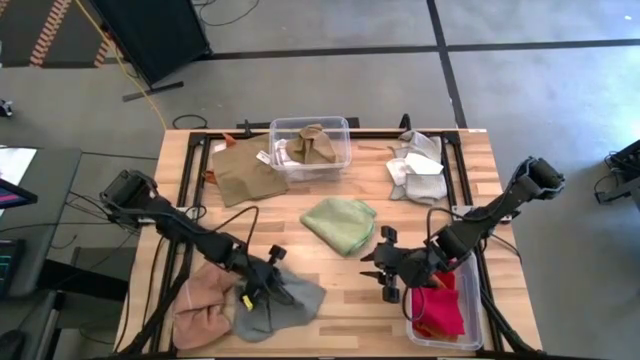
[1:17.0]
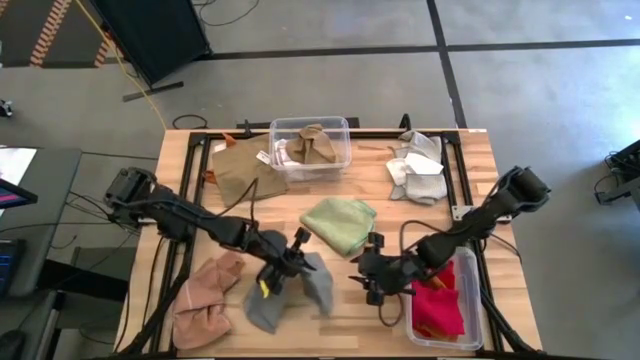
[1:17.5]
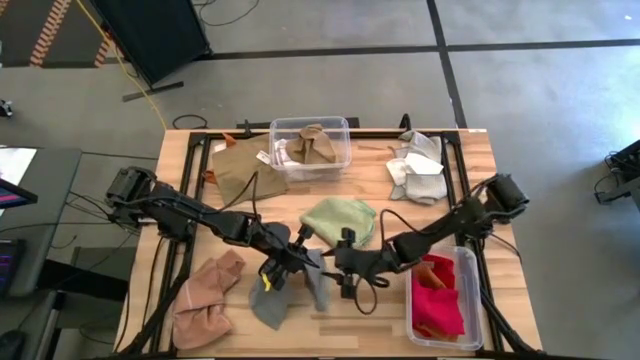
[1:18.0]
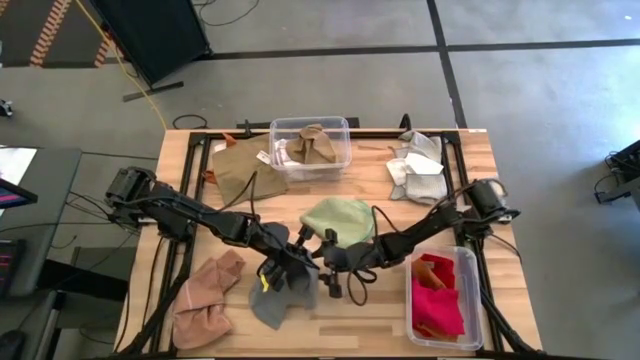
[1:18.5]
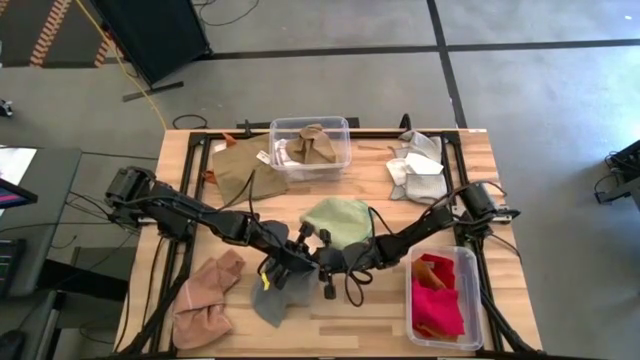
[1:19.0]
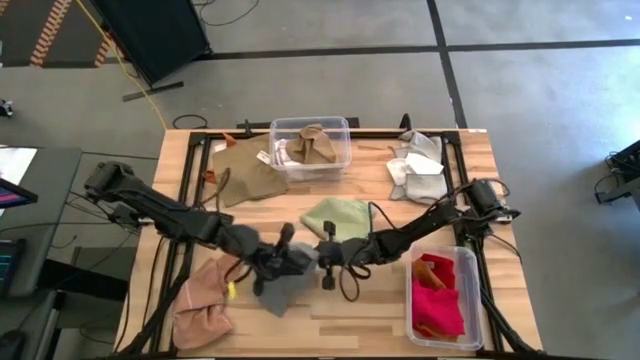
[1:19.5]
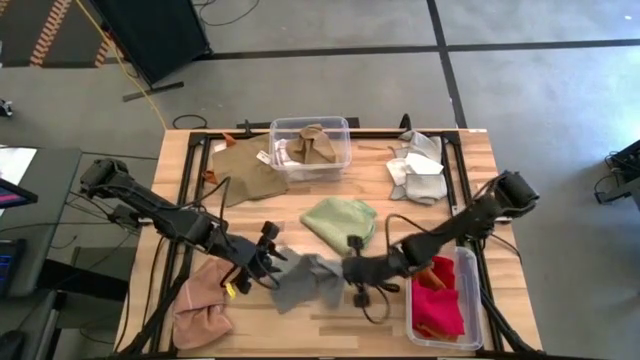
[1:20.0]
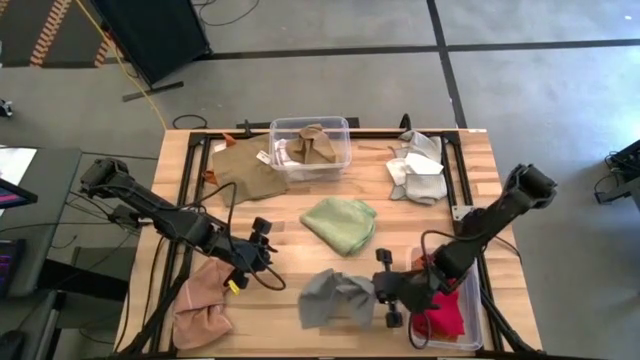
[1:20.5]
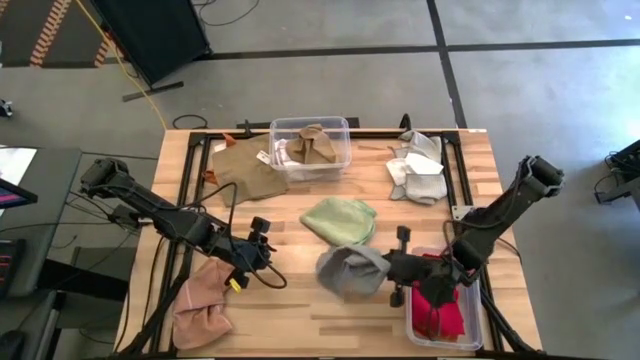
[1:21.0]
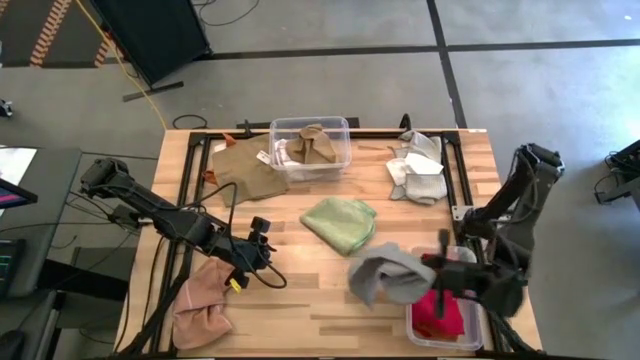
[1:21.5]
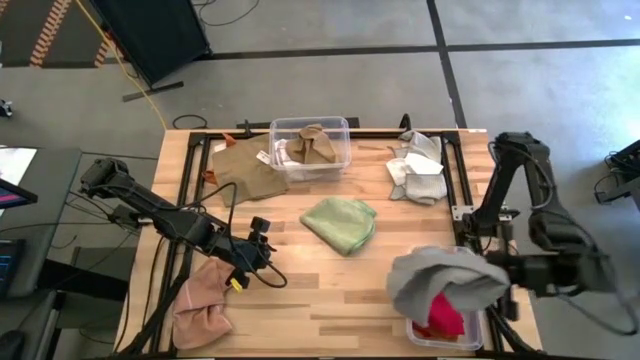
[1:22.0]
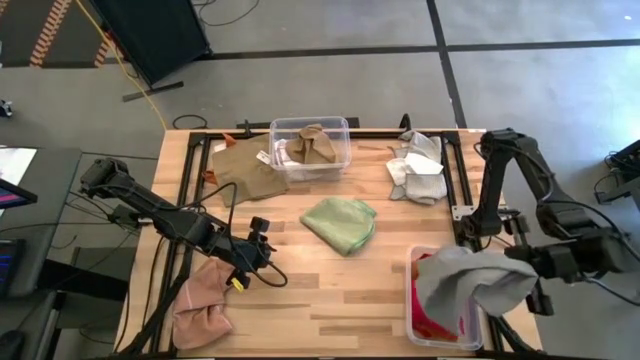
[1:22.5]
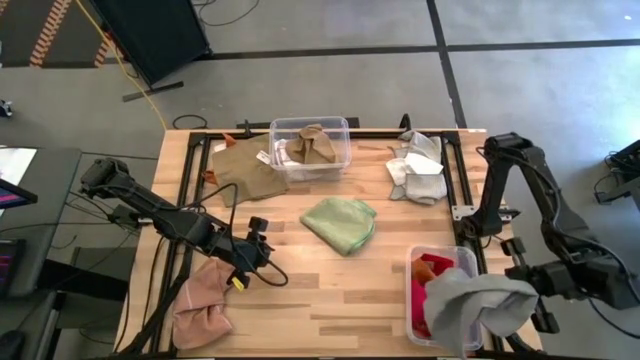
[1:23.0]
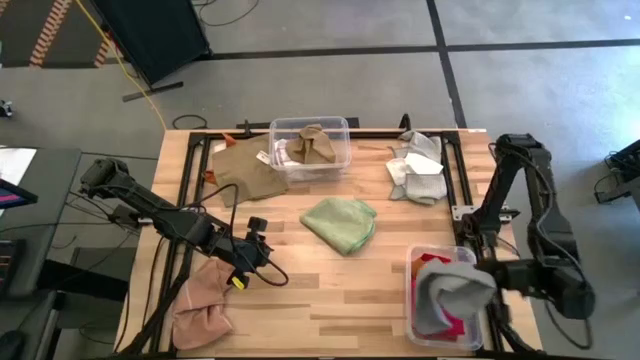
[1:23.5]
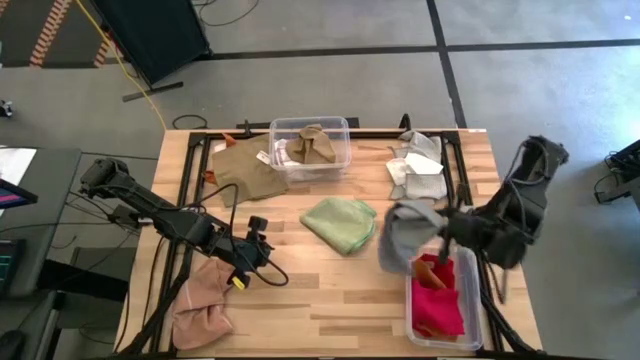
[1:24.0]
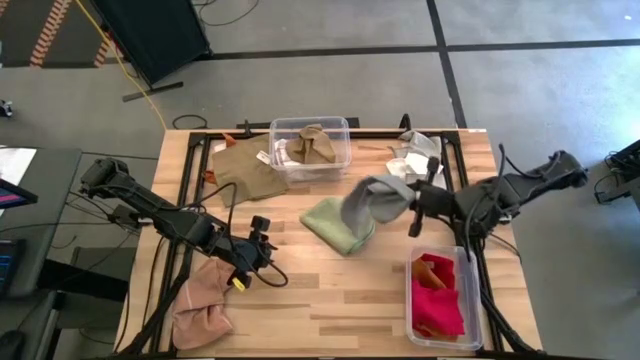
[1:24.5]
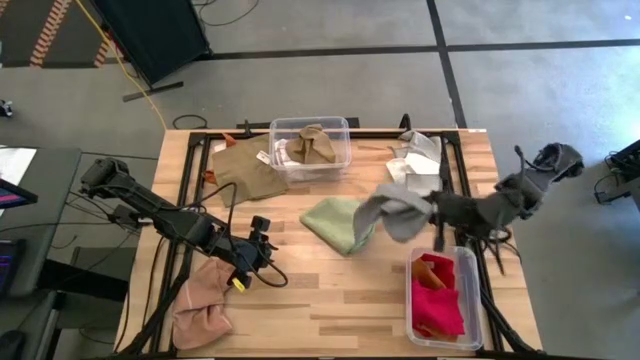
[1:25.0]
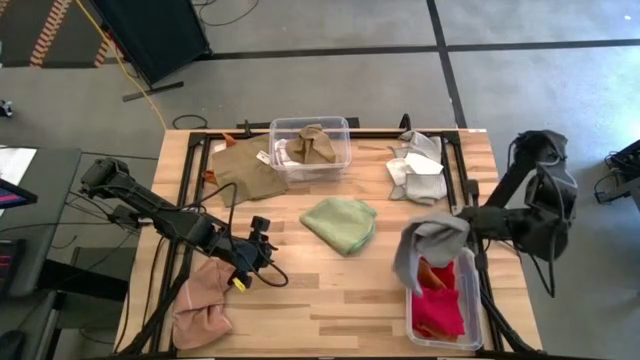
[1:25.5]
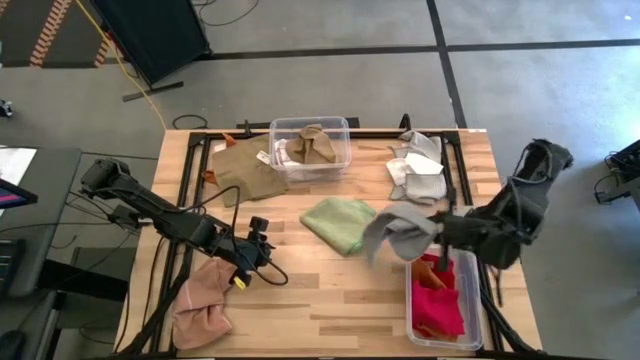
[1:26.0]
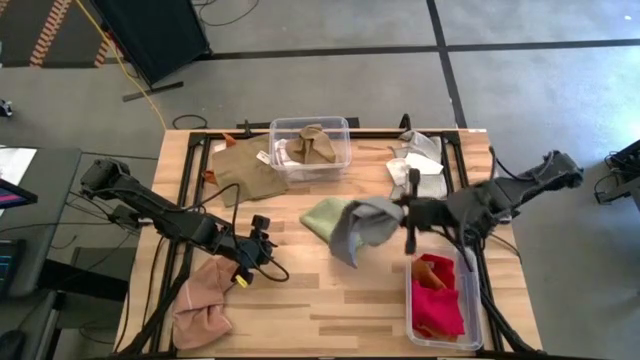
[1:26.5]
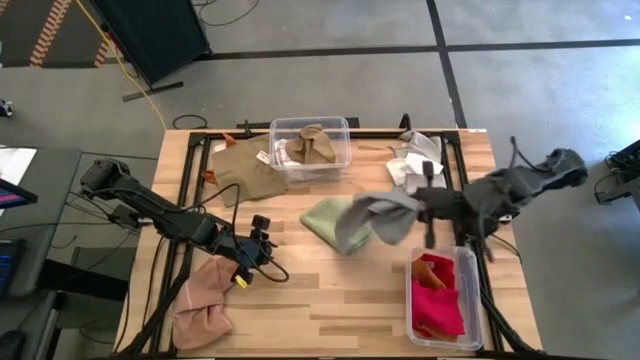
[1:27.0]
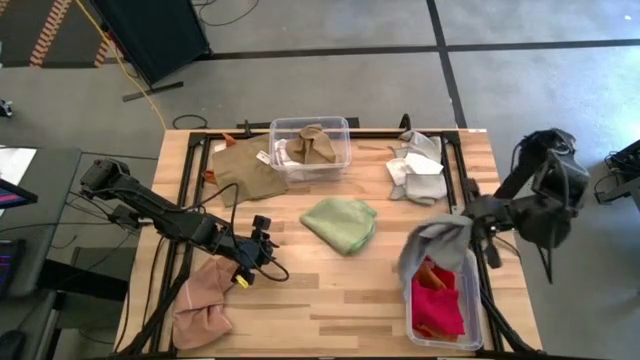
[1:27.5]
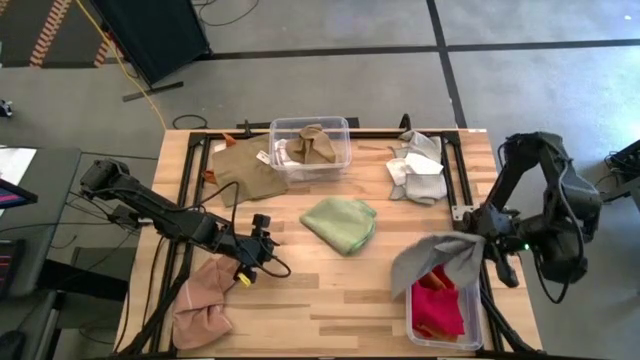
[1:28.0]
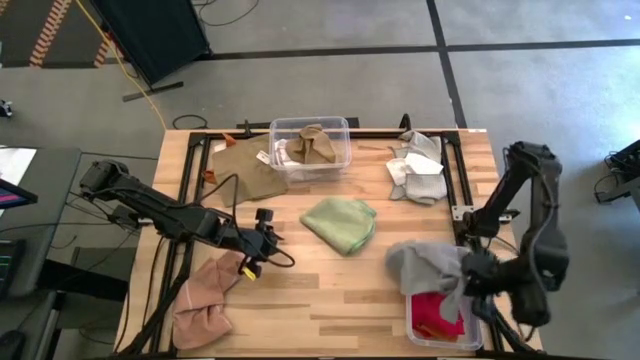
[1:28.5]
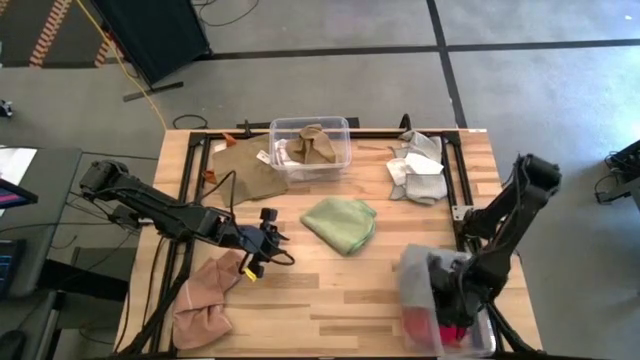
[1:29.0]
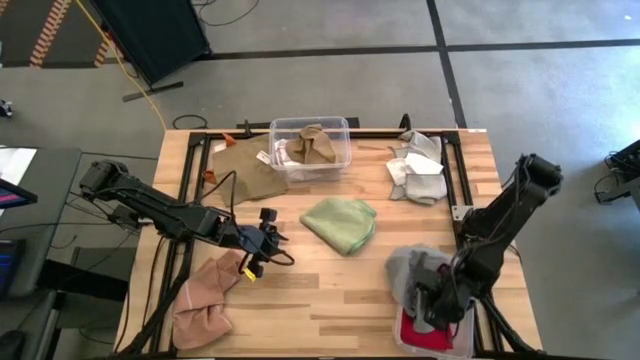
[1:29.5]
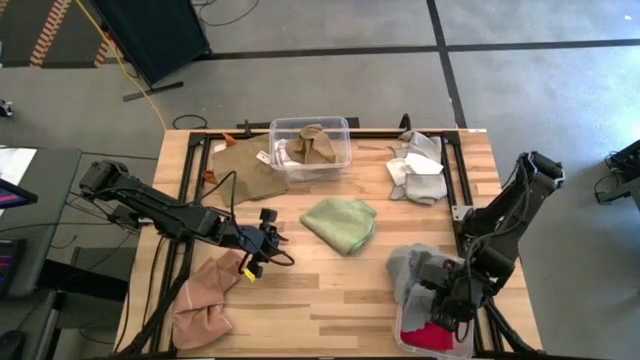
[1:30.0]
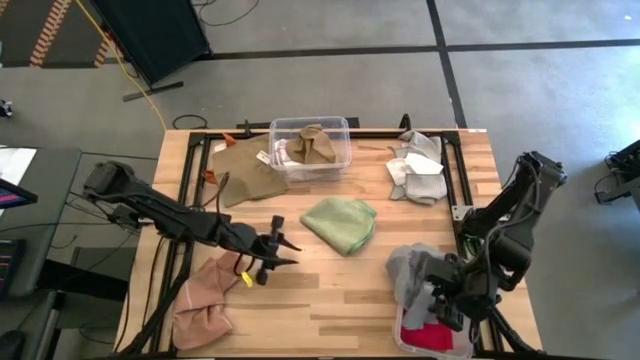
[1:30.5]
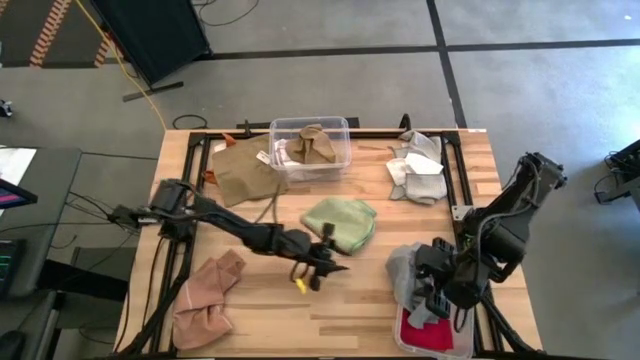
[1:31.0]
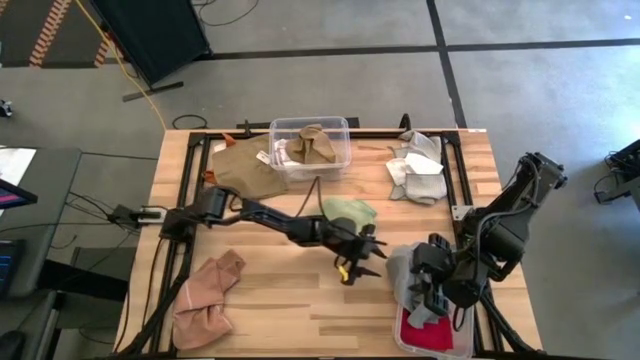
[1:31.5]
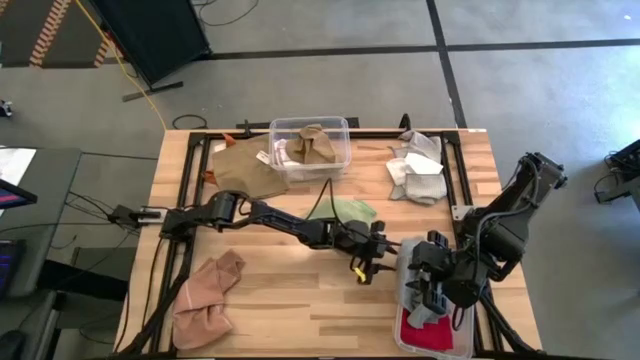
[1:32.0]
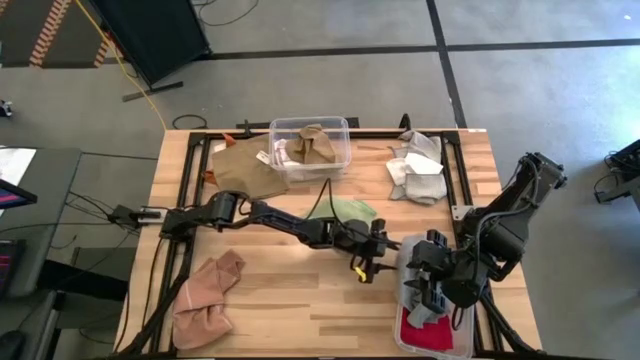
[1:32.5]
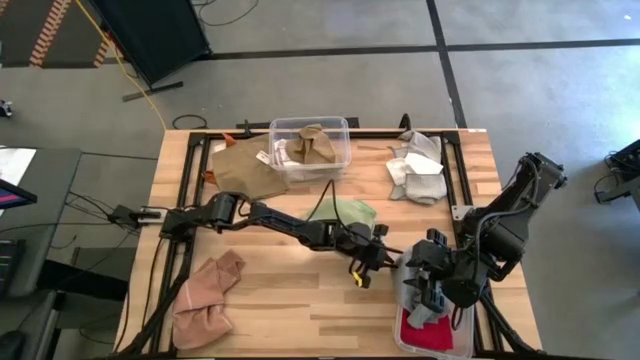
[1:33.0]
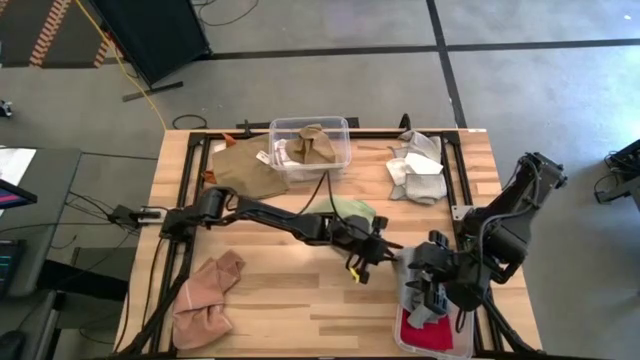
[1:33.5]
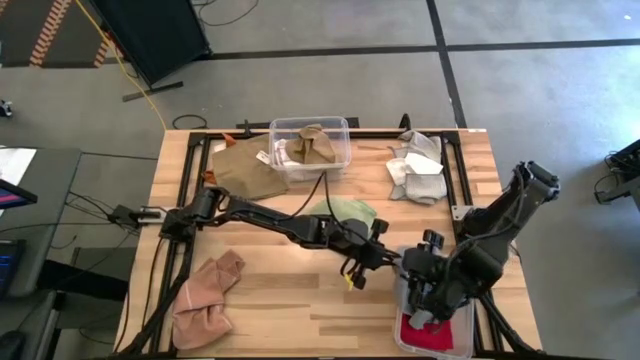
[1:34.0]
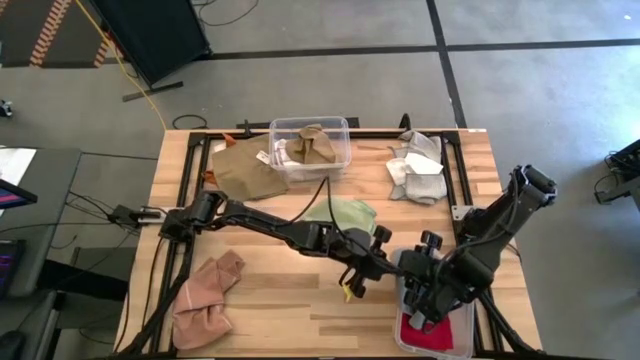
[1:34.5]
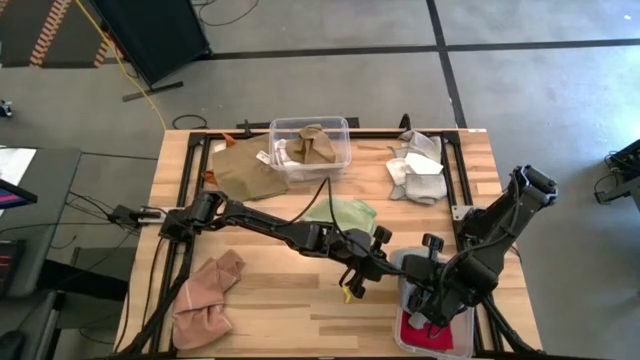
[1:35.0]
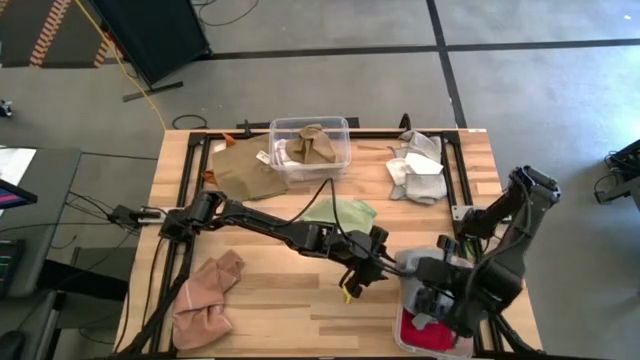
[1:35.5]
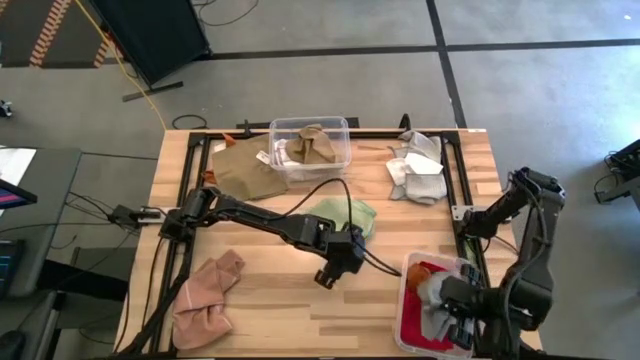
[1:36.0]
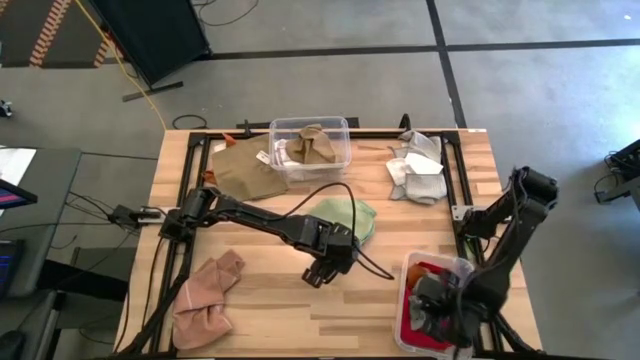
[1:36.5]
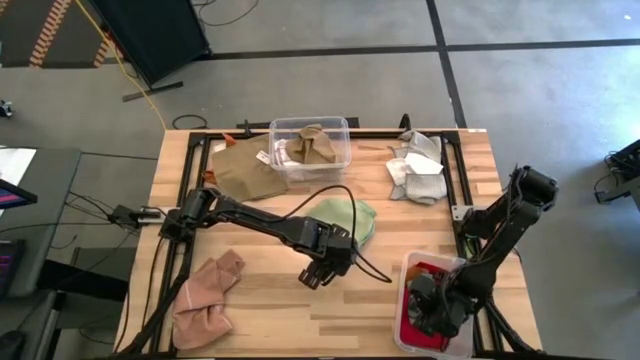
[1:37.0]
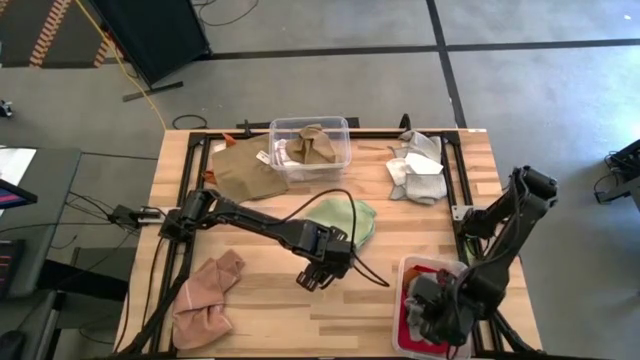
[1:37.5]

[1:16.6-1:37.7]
Task: Sort towels by color in basket
Put the gray towel into the bottom transparent bin
